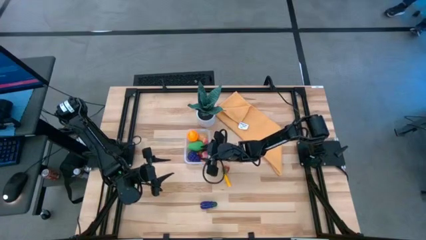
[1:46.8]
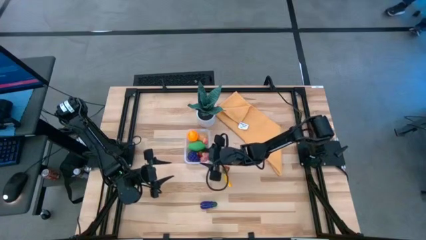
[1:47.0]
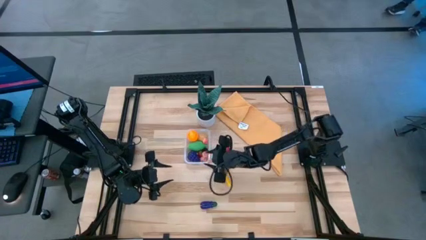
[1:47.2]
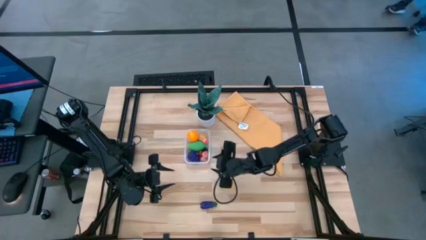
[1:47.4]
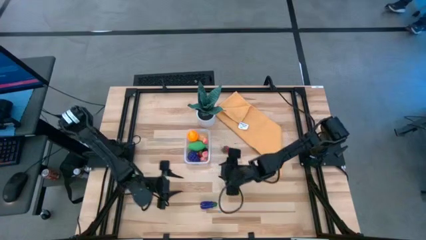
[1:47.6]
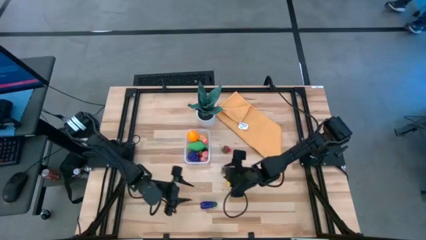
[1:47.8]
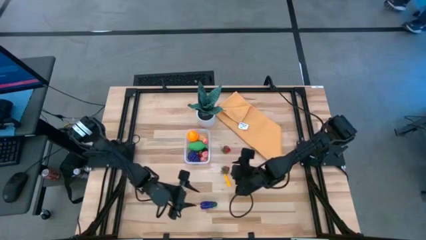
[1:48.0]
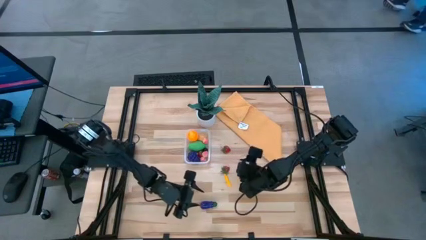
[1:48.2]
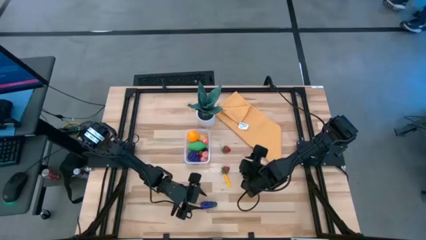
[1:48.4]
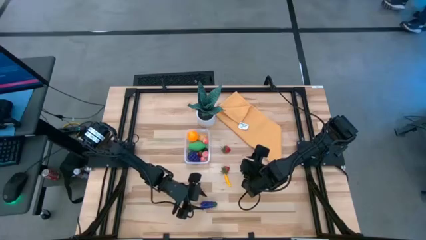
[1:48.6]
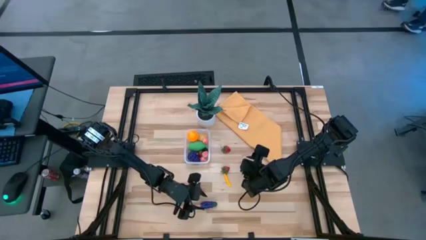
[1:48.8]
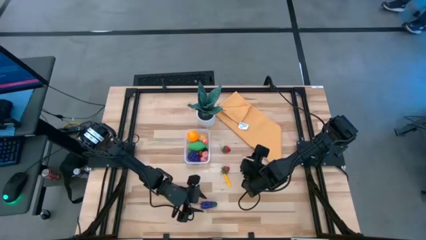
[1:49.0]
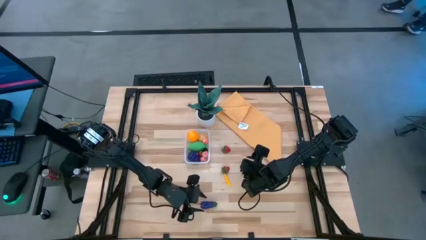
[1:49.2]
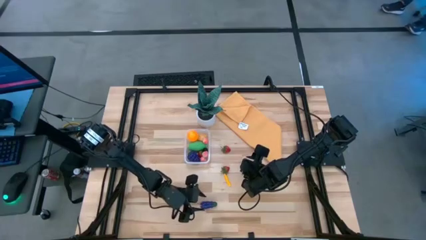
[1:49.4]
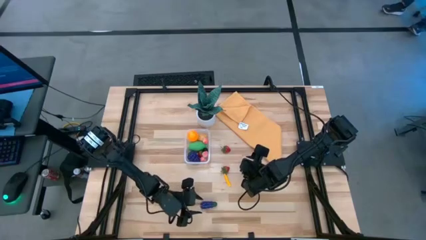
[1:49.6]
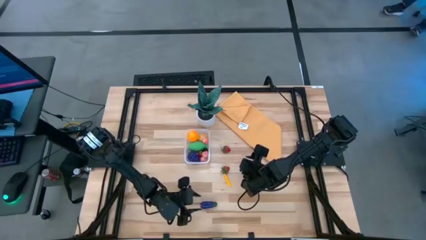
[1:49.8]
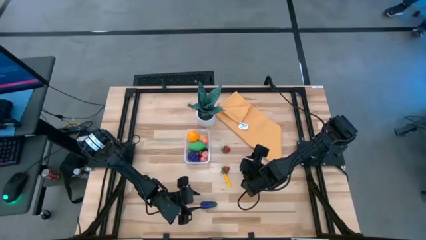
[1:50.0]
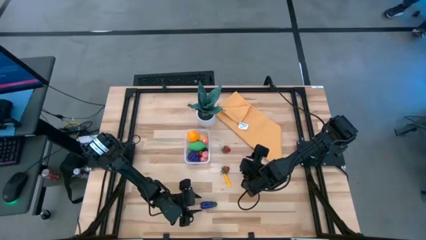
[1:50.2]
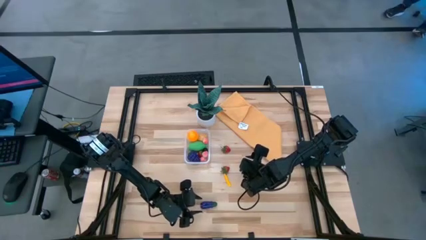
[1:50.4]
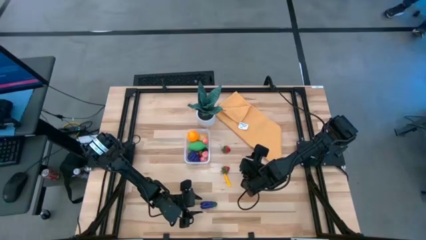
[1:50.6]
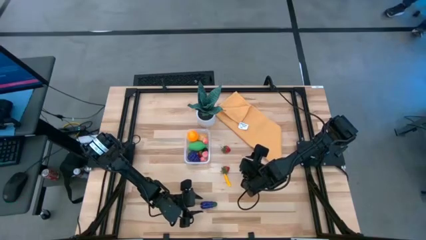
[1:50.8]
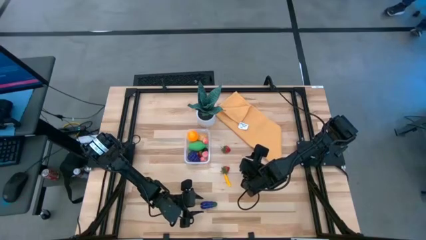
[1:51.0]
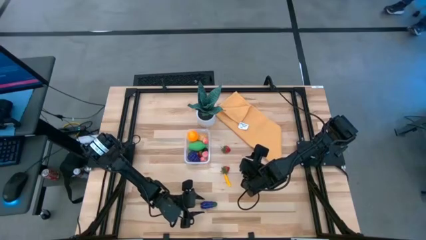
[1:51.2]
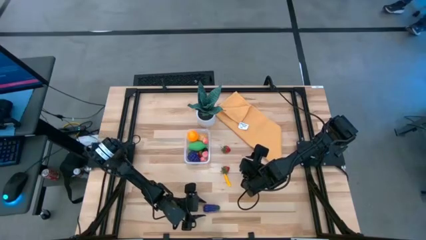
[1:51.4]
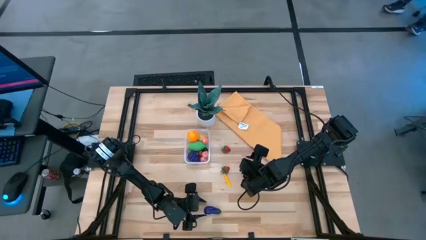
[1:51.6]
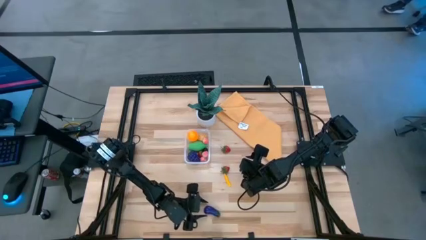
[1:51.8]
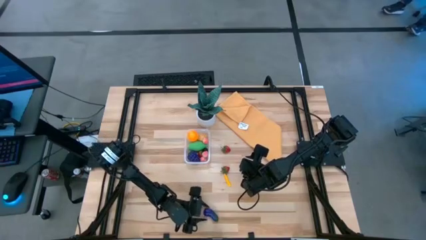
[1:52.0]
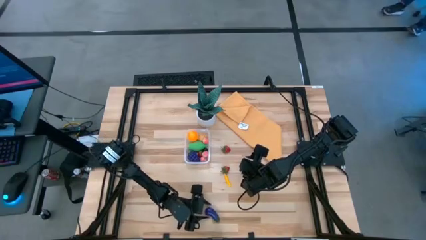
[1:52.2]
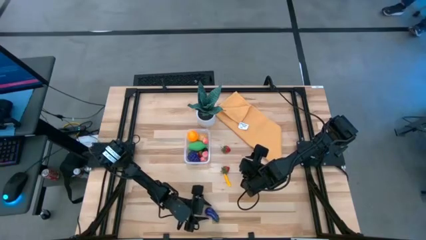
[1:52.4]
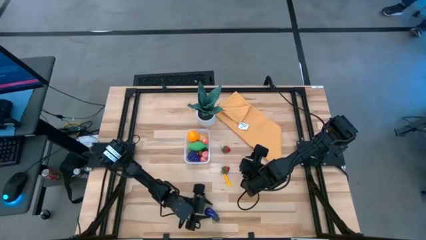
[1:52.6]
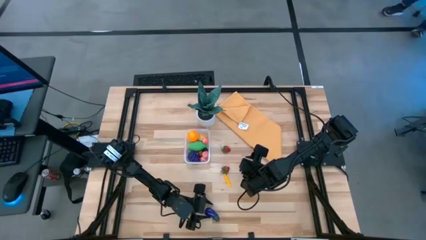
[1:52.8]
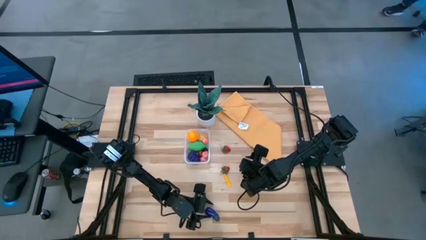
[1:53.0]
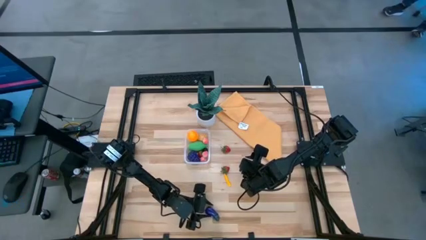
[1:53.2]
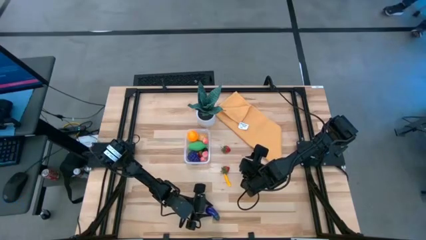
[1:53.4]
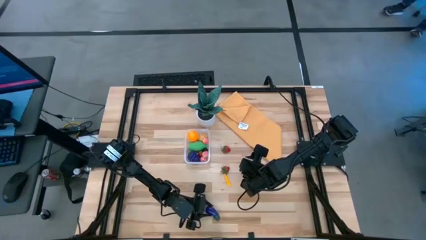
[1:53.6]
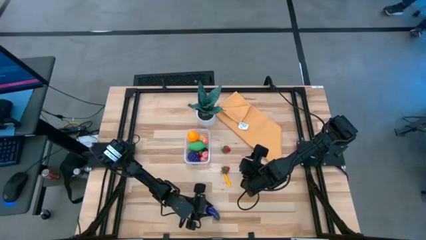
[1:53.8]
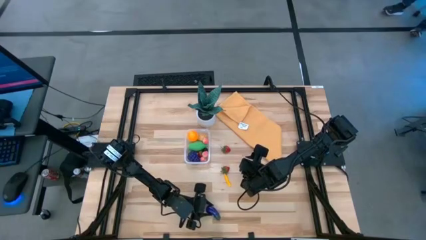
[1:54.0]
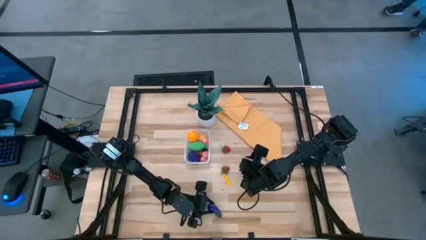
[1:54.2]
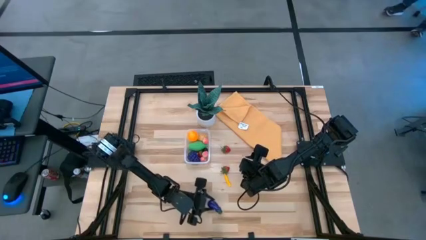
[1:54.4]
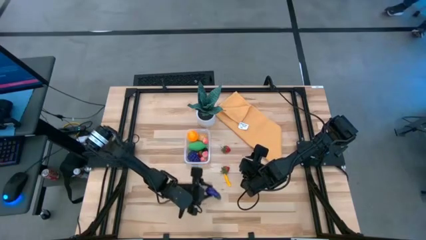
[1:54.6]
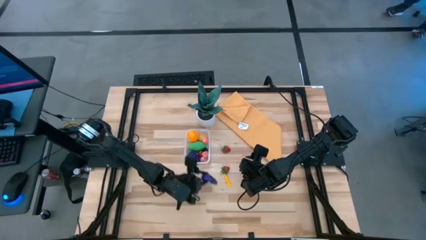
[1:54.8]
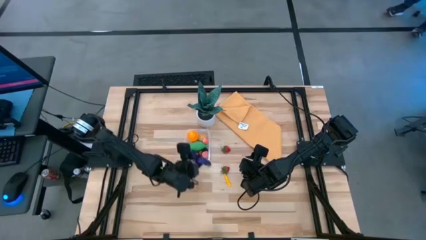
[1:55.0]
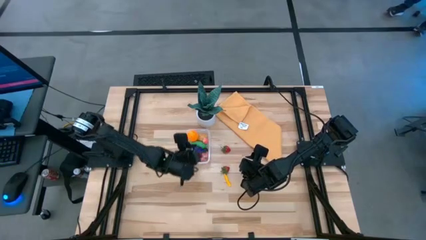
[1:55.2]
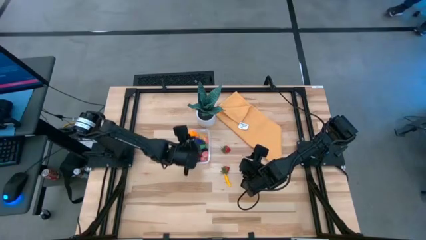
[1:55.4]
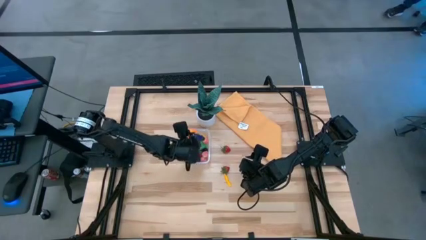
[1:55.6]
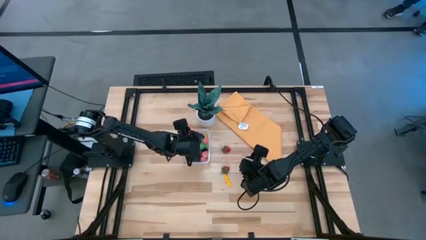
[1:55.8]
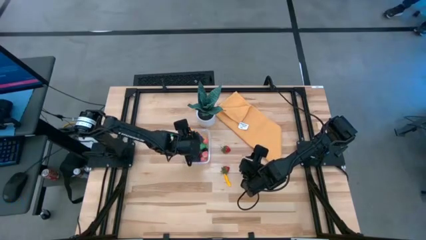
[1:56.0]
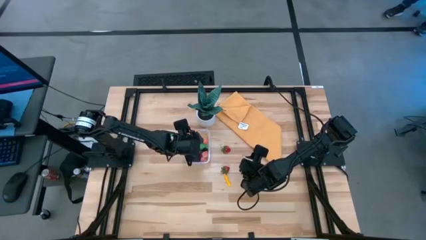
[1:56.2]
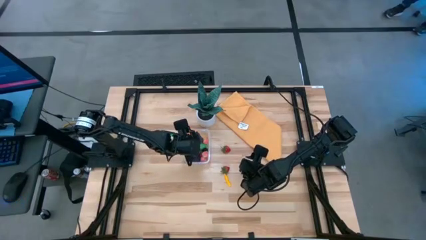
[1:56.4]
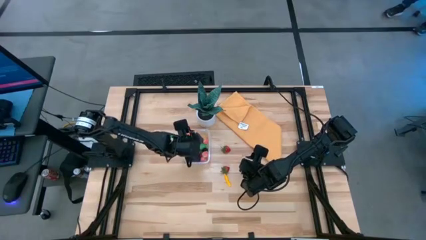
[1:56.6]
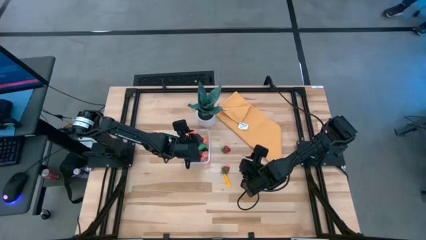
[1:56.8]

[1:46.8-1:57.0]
Task: Pick and placing Produce into tupperware
Put the eggplant into the transparent bin

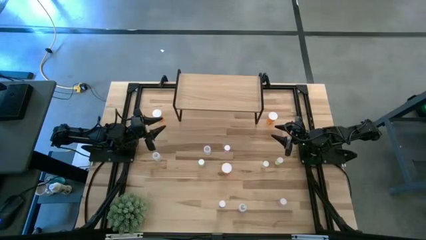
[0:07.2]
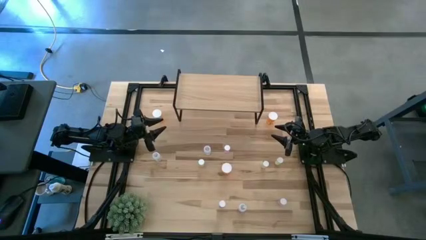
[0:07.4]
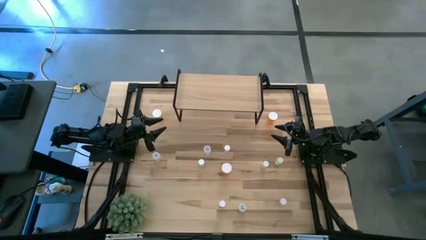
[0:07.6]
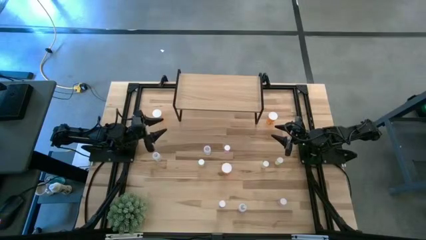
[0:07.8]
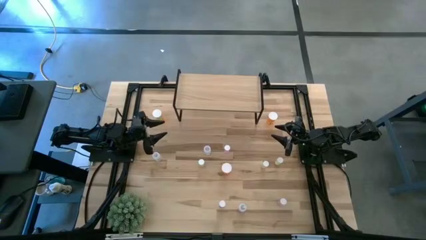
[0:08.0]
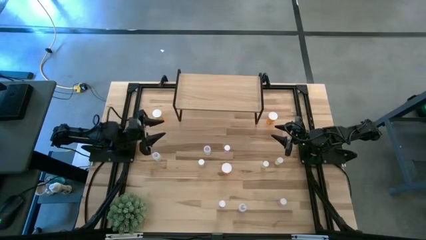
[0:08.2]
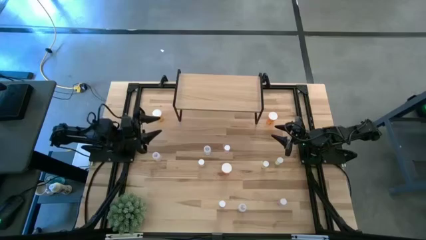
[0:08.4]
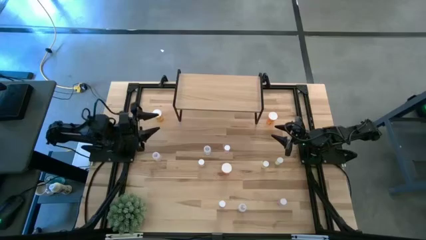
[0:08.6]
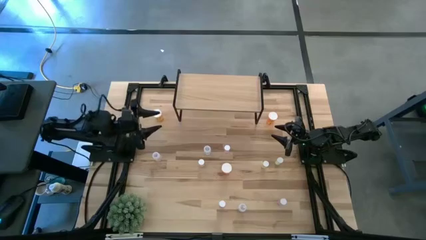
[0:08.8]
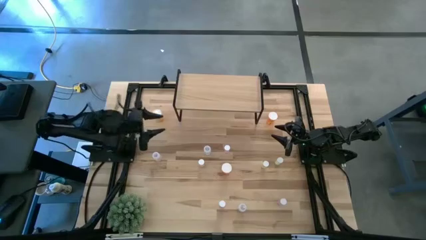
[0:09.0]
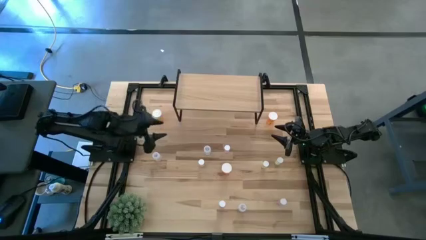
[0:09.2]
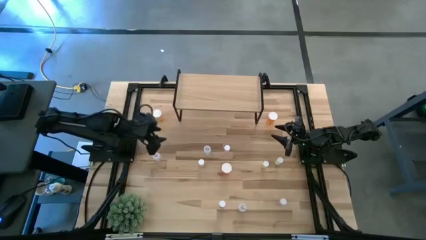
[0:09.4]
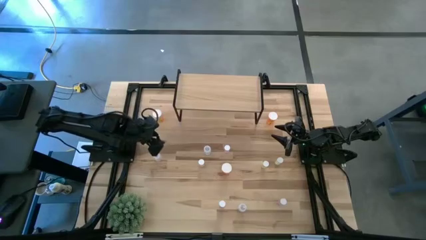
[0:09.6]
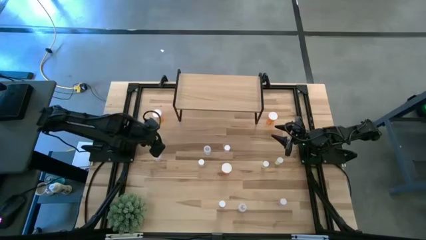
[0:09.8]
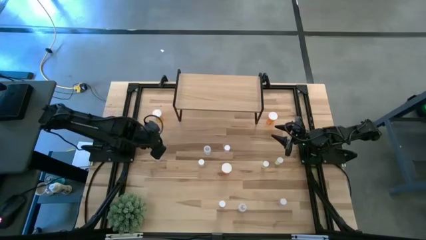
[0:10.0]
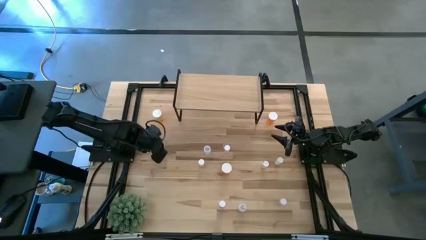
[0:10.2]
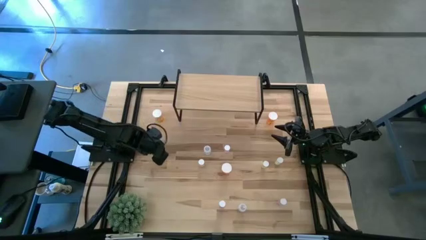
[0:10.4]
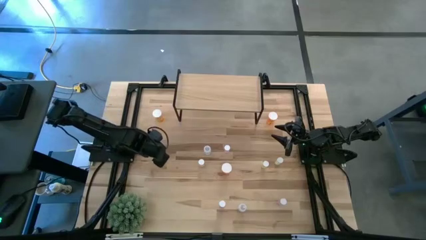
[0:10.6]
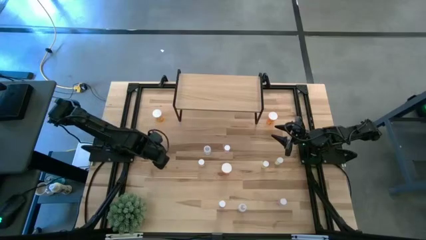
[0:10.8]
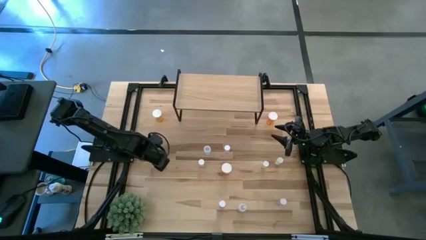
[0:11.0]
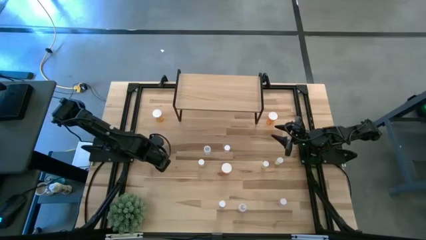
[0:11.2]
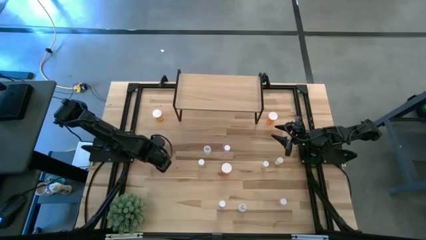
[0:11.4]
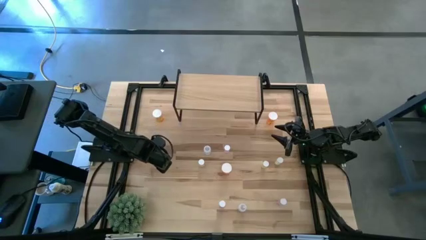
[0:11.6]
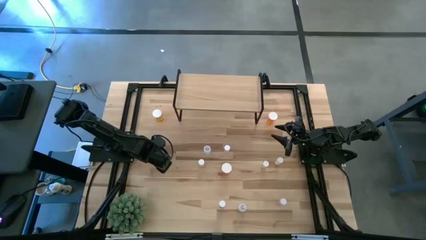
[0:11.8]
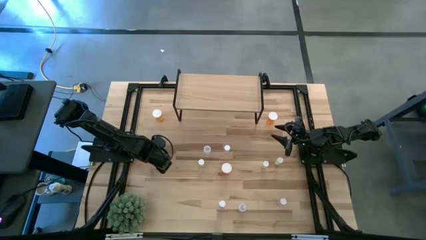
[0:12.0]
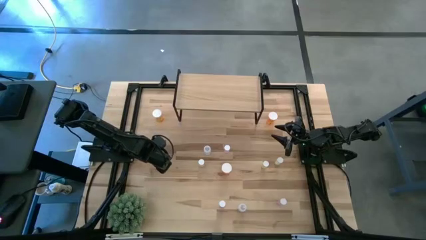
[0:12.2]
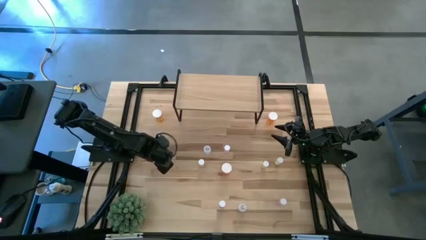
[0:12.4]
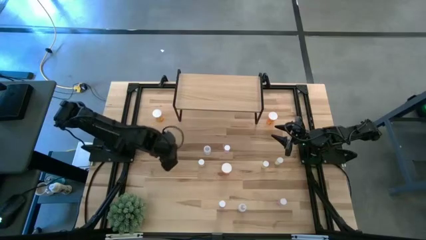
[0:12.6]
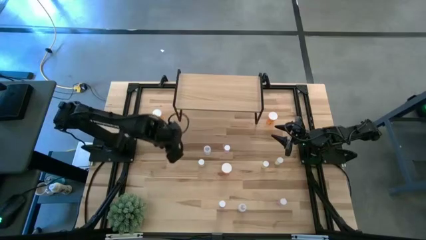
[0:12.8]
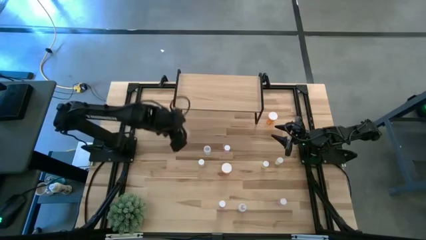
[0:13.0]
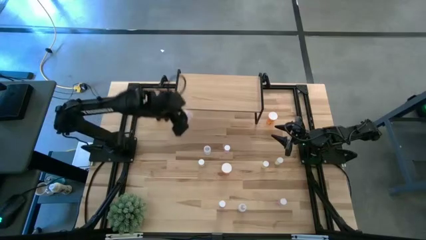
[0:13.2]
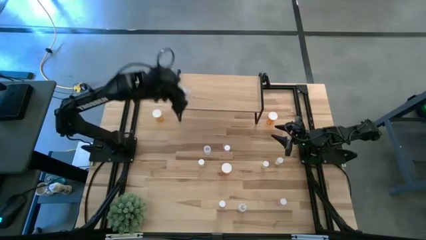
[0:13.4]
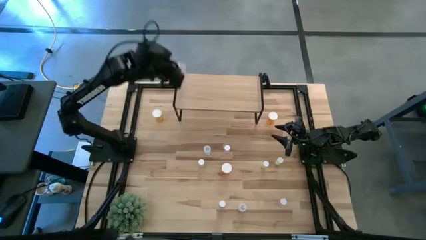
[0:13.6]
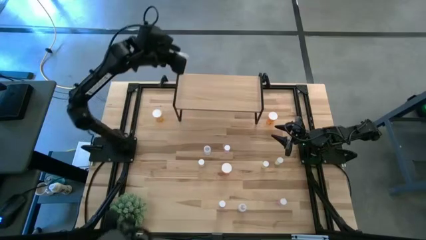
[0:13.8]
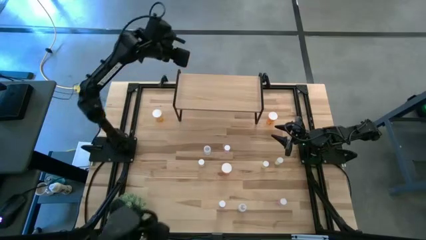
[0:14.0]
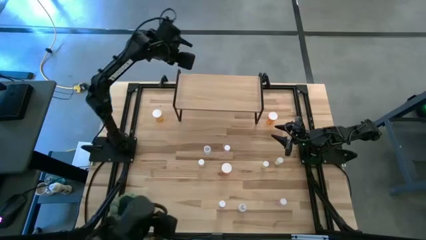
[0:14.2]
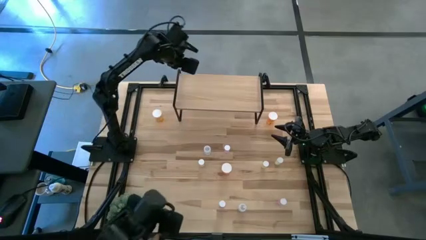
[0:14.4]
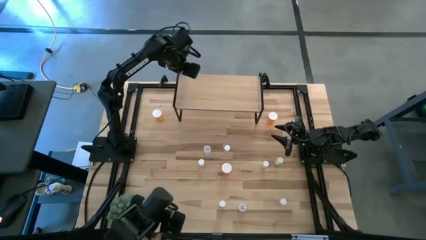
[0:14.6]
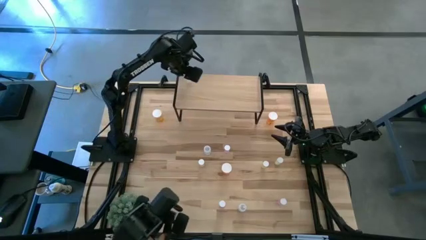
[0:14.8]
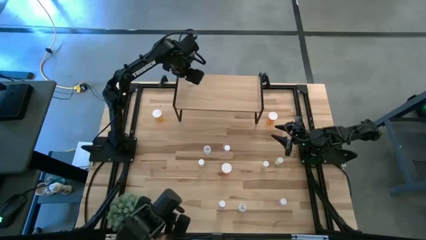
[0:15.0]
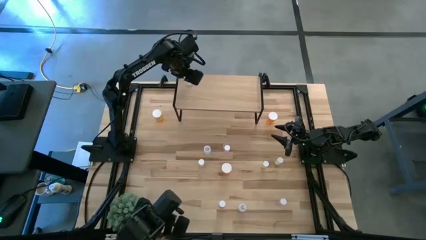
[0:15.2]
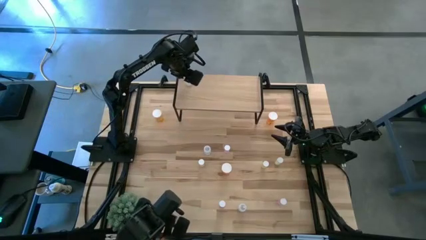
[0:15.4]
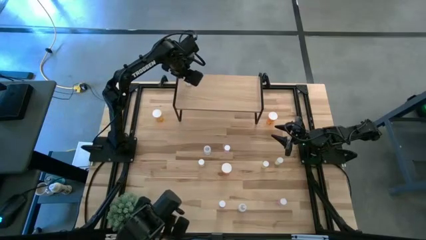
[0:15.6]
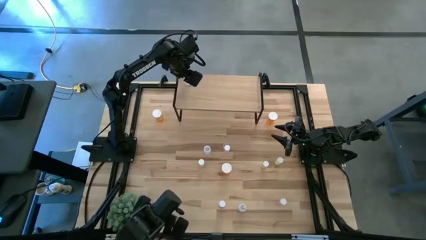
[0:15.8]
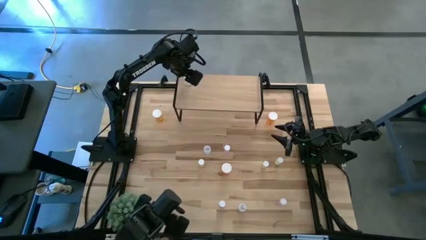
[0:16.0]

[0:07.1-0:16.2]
Task: Pick and place medicine bottles onto shelf by color
Put the top left transparent pill bottle on the shelf
